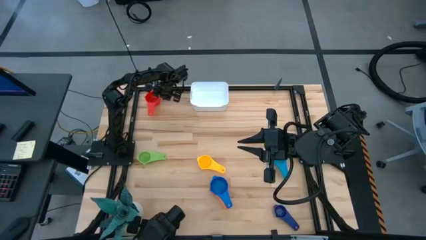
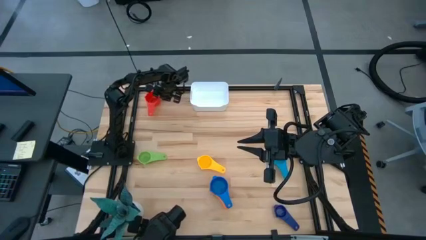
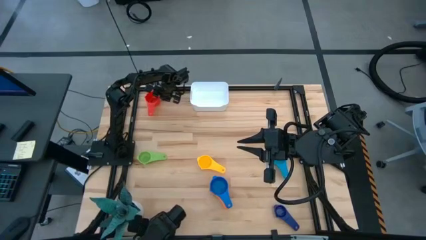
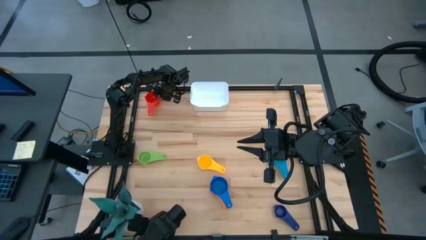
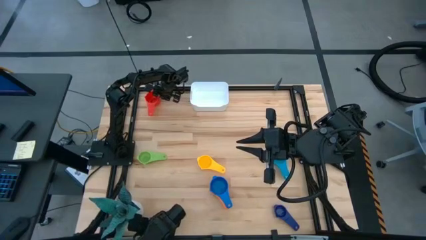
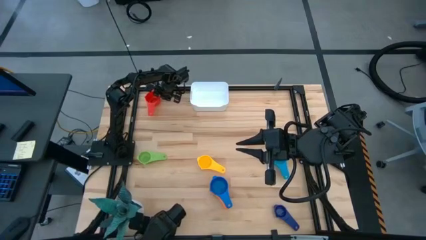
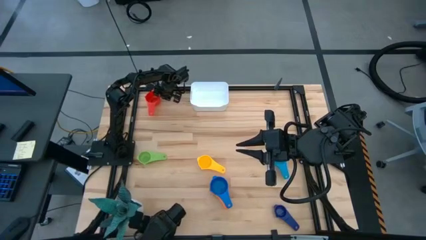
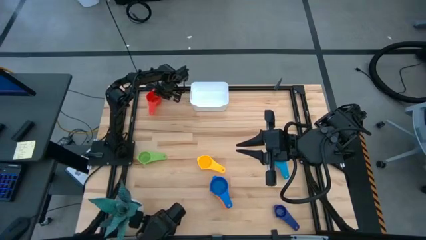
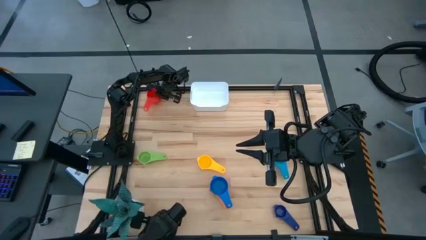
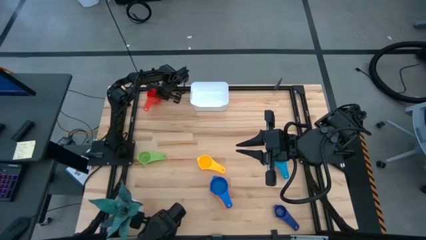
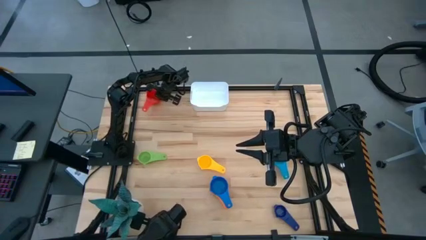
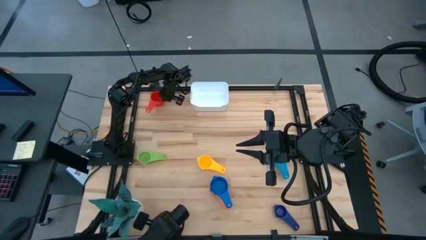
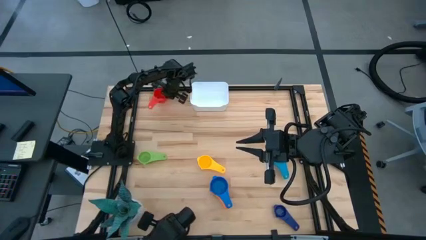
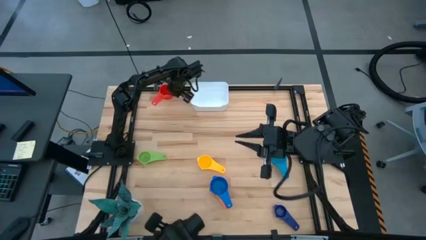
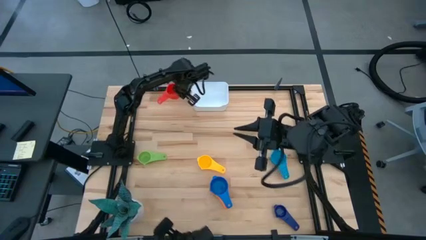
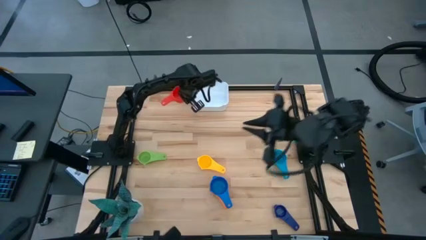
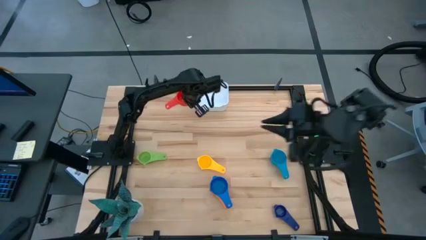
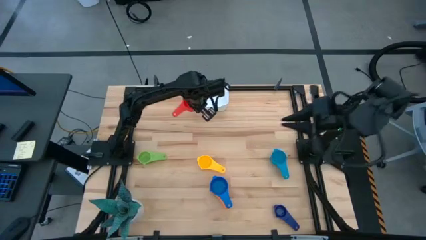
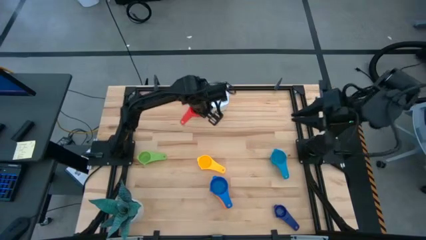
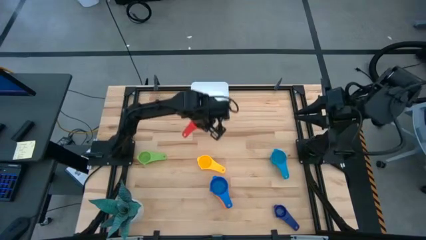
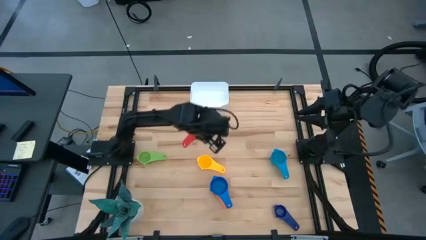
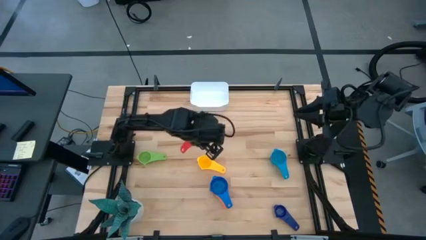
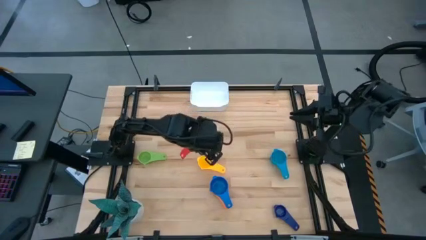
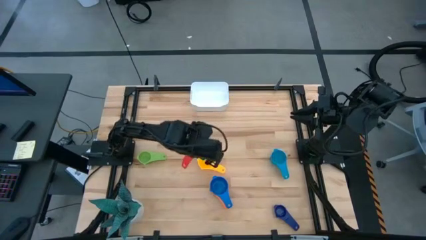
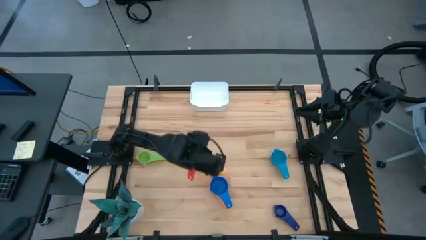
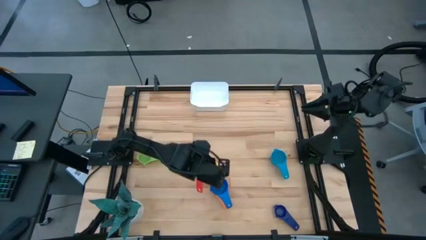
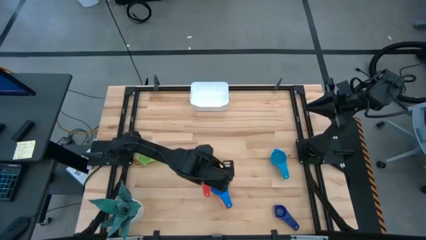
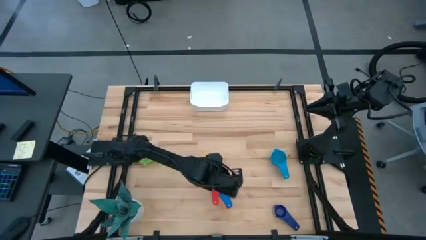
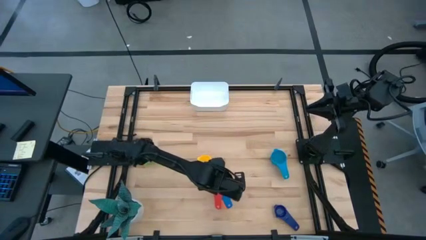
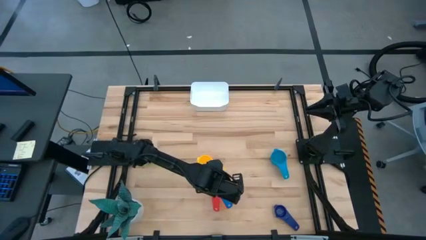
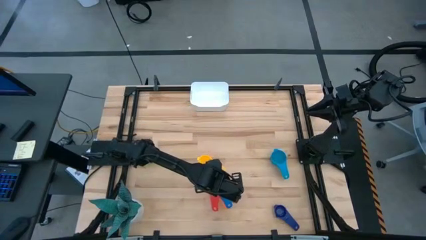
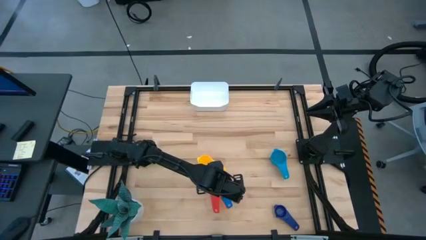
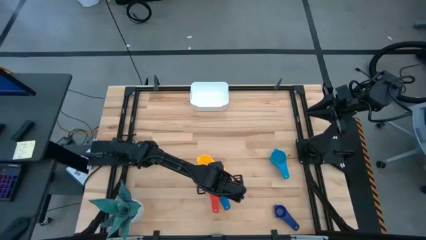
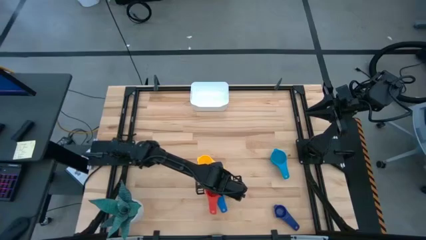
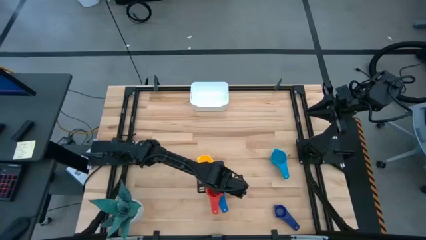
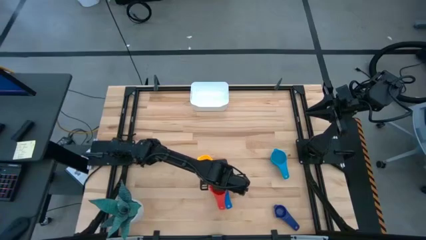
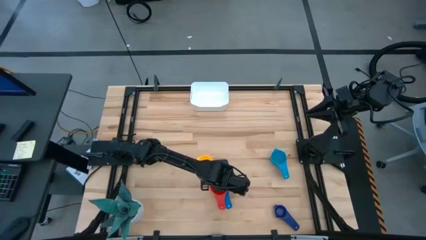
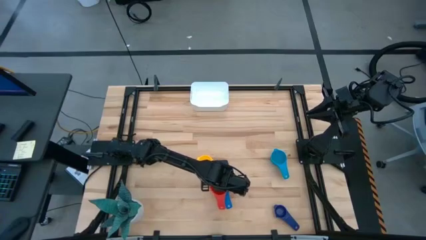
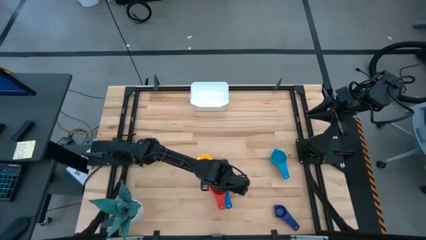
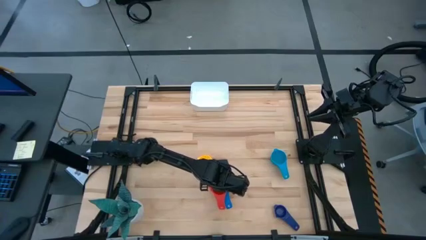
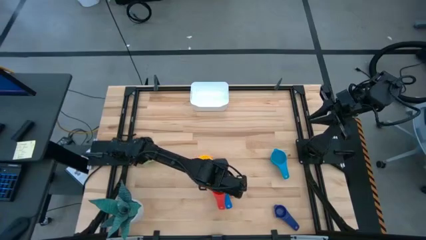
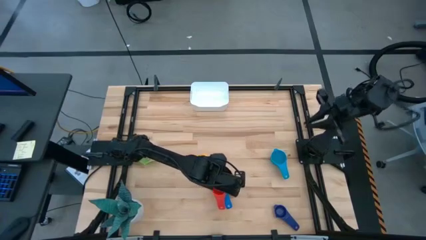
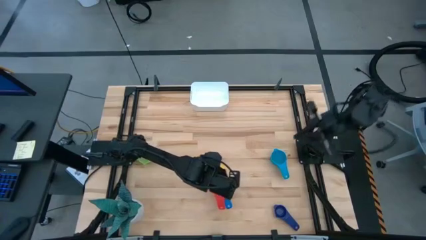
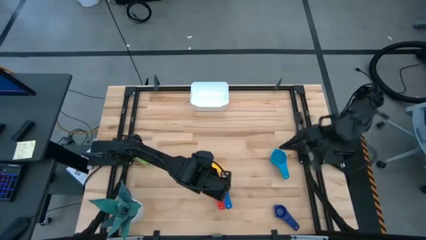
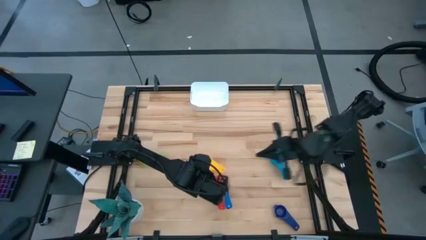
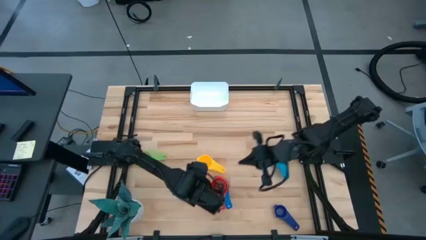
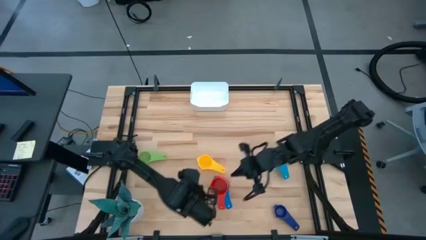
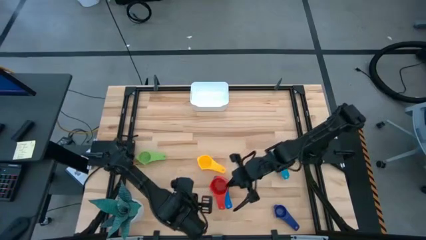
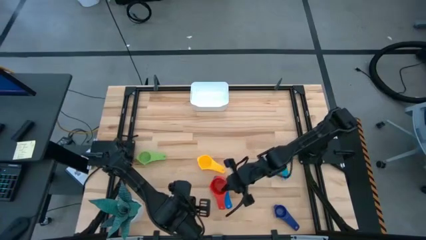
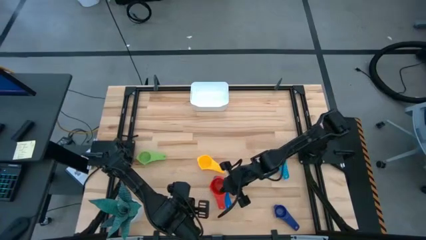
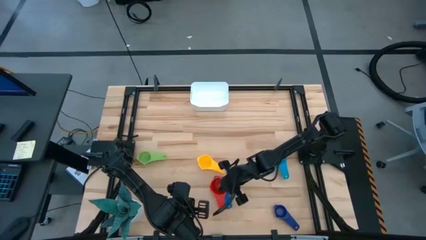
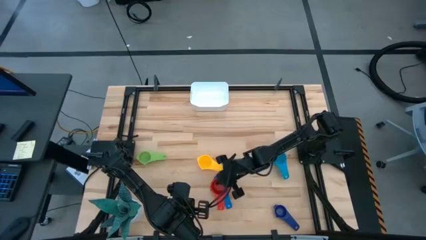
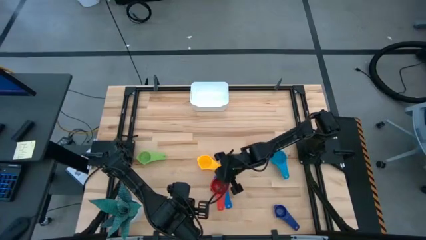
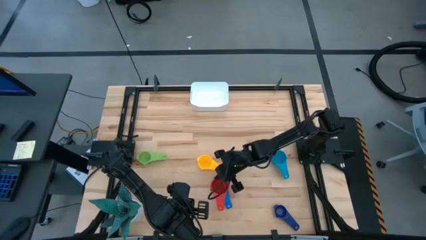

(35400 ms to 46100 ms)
Task: Nest measuring cups in basket
Stack the red measuring cup on top of the blue measuring cup
